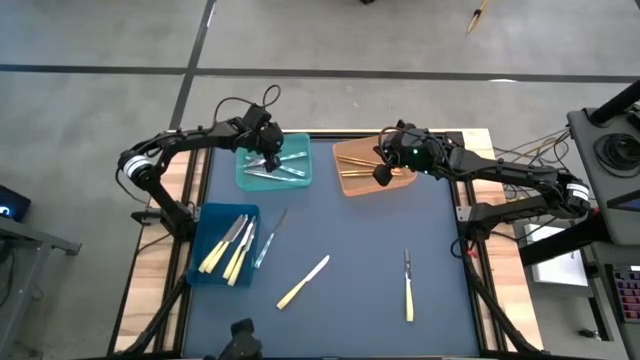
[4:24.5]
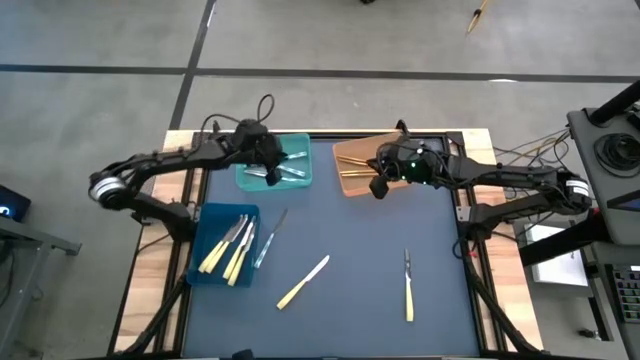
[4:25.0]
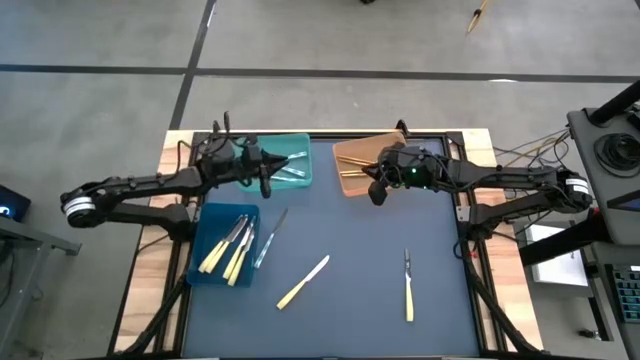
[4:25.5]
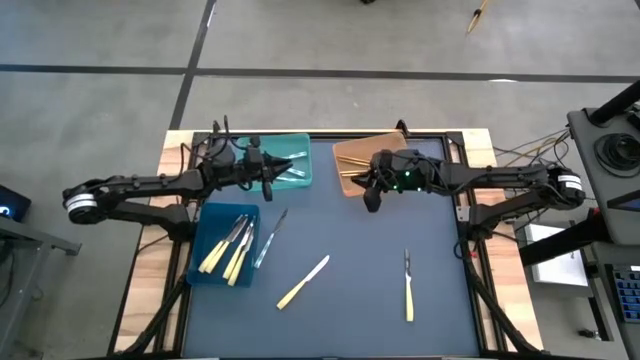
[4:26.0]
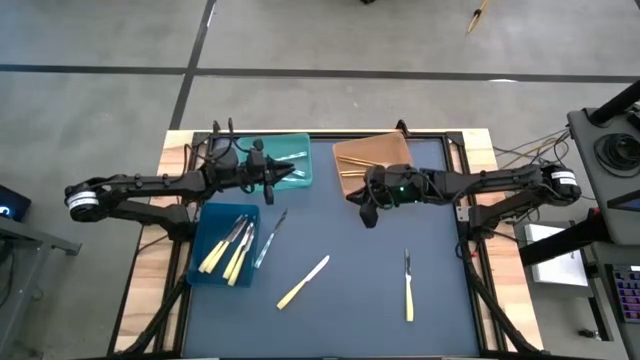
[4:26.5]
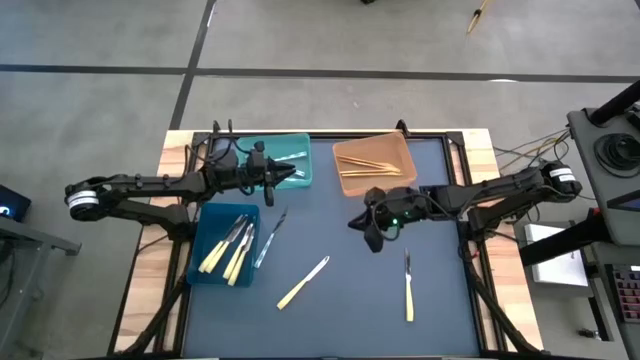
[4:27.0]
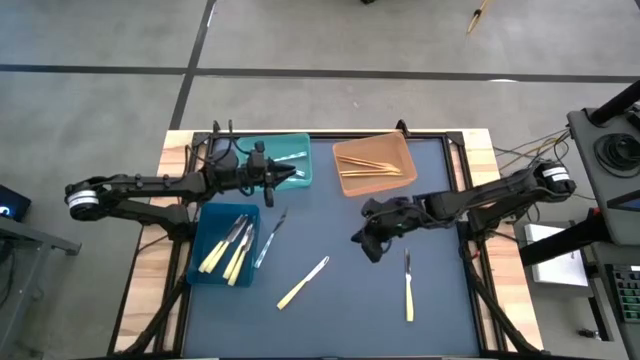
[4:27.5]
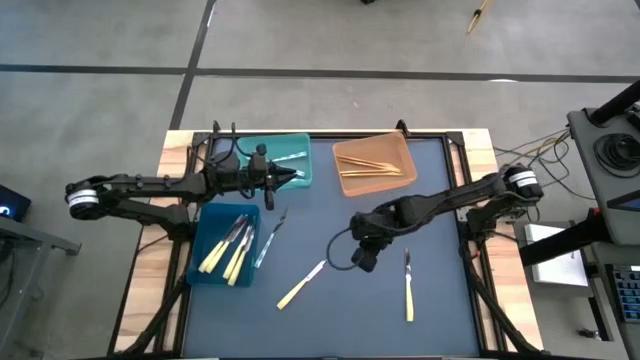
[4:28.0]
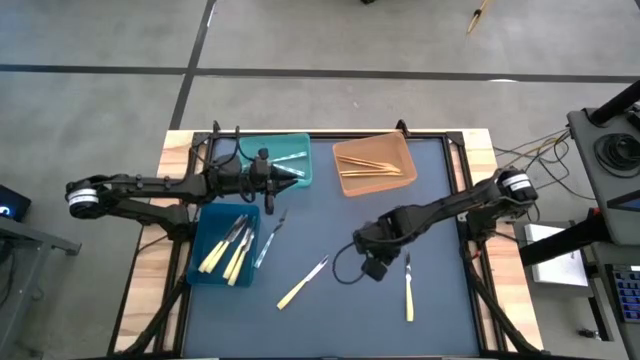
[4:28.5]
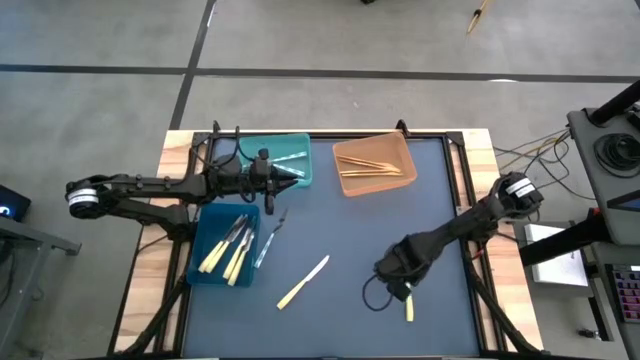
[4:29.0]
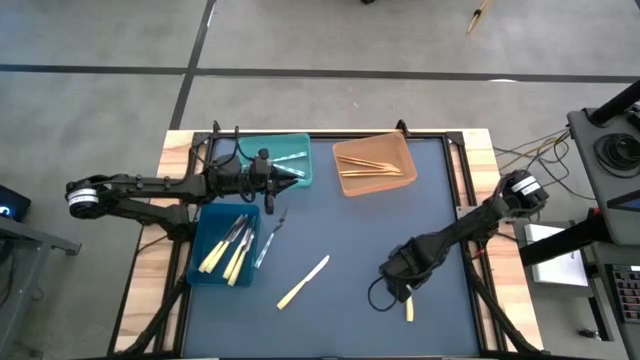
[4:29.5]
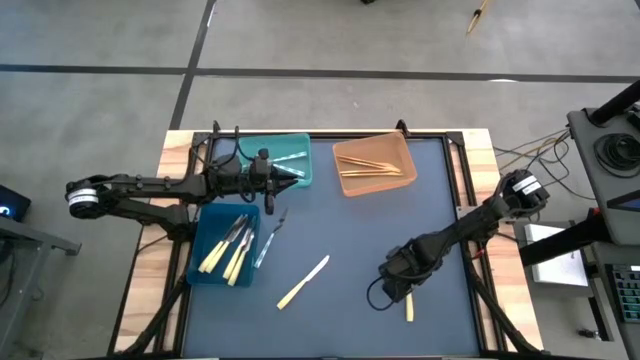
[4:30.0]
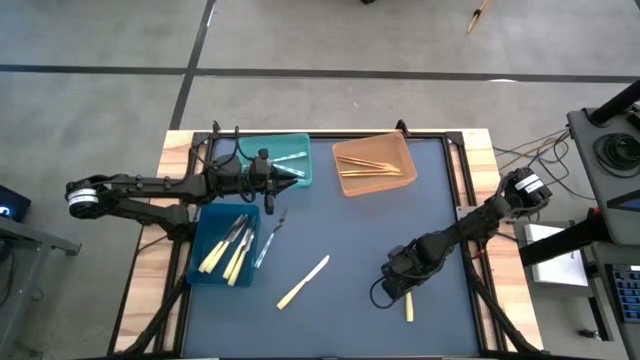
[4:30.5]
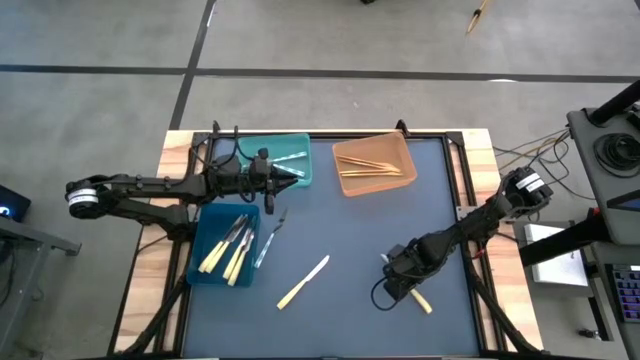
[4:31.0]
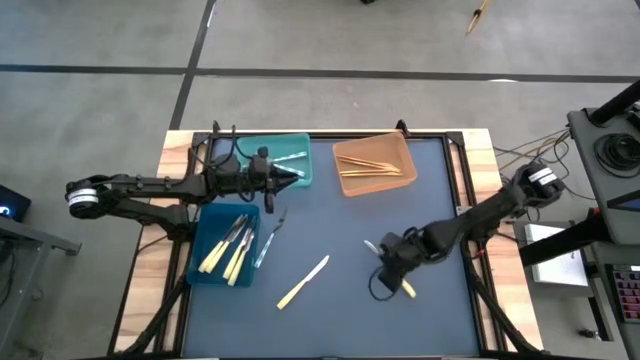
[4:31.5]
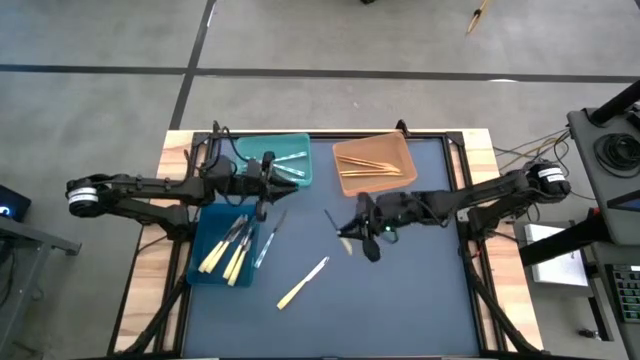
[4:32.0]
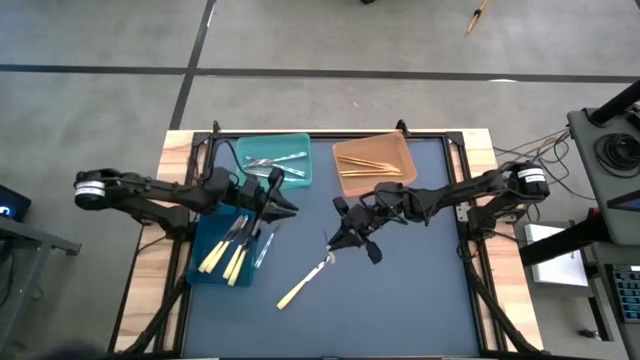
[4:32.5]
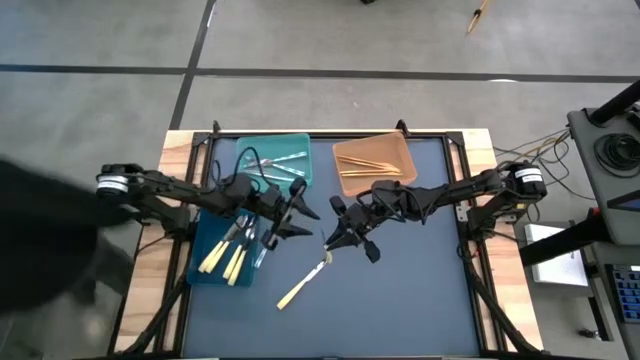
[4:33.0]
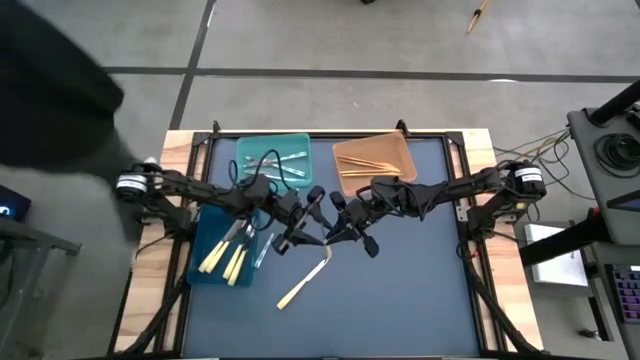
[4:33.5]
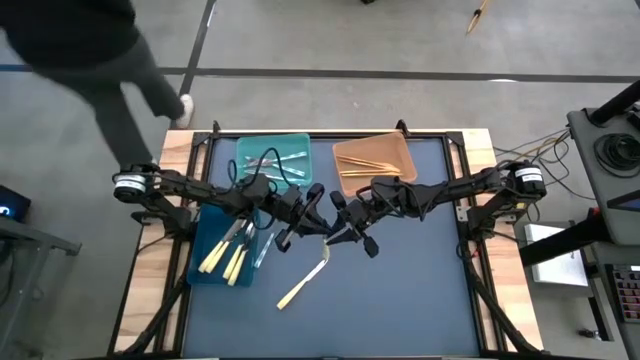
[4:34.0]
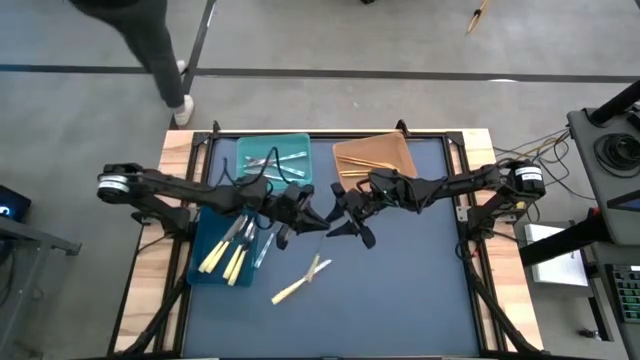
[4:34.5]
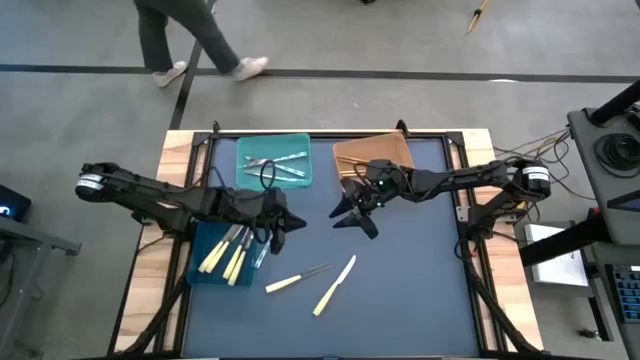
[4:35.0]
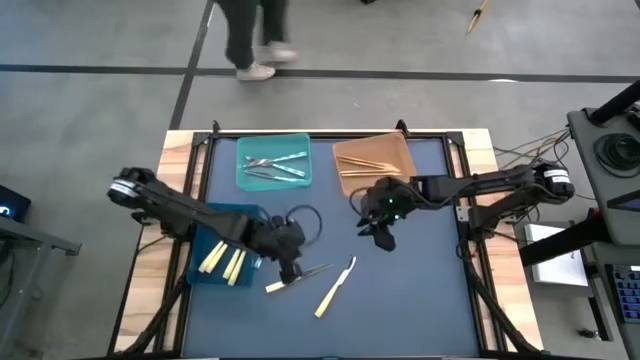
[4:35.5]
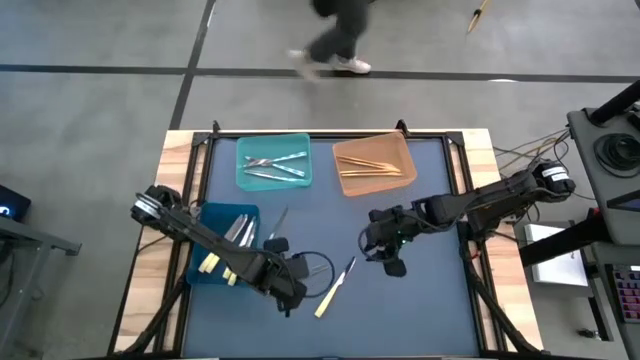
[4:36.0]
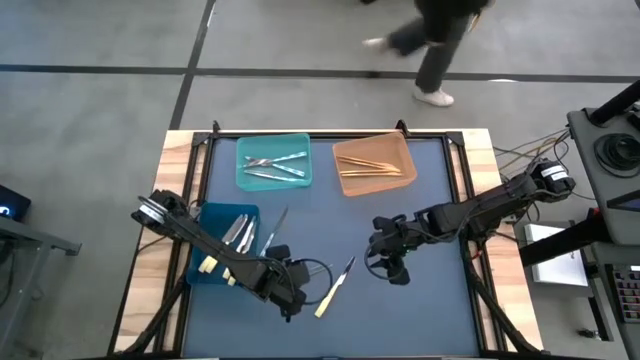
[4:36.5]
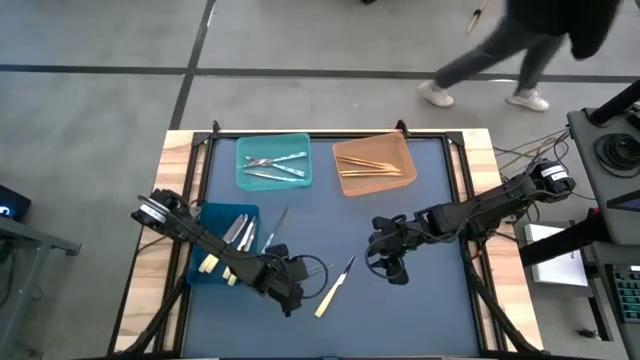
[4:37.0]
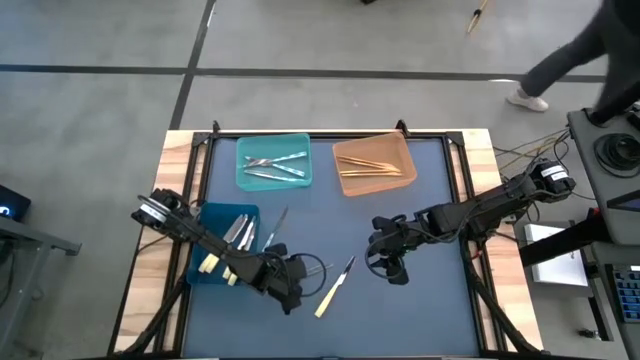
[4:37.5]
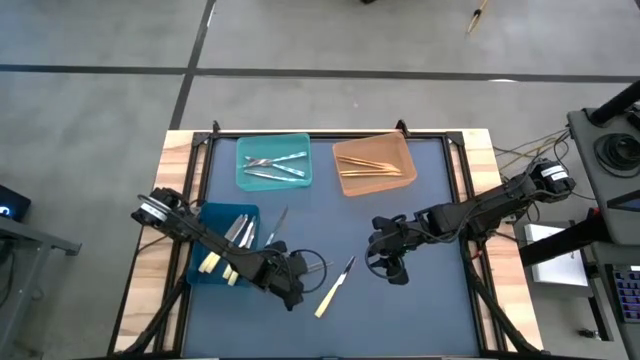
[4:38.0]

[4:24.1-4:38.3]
Task: Sort silverware by color (type)
Put the light yellow knife into the blue bin

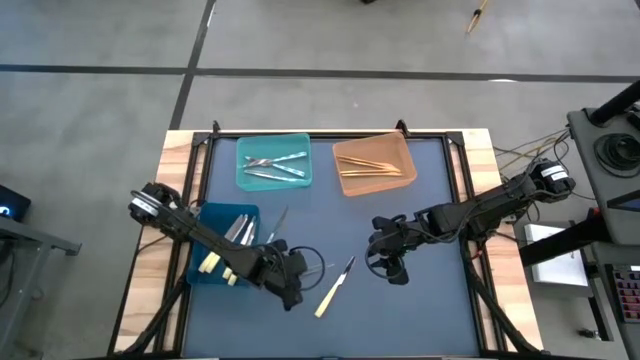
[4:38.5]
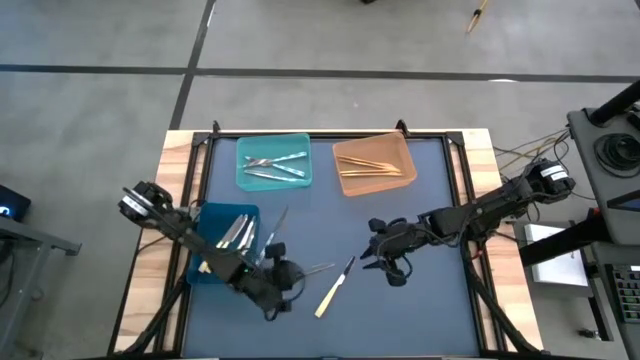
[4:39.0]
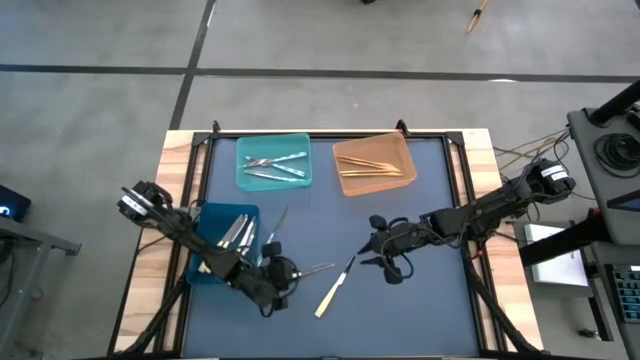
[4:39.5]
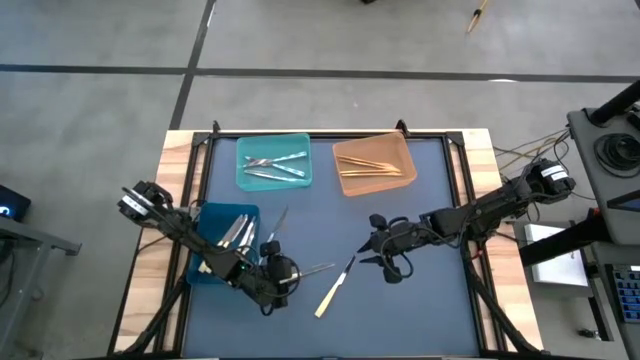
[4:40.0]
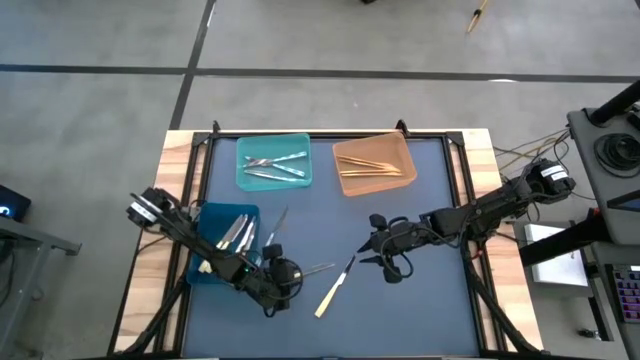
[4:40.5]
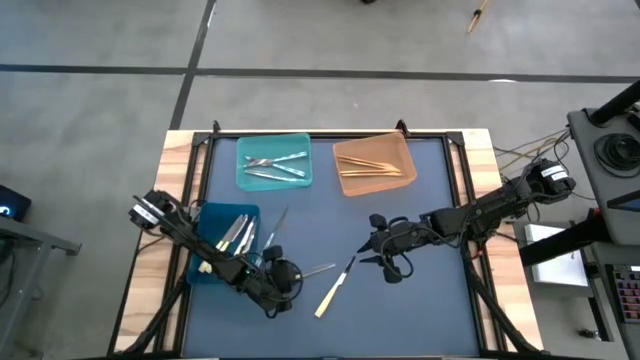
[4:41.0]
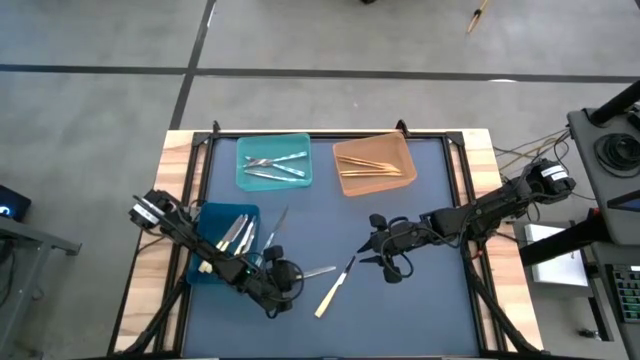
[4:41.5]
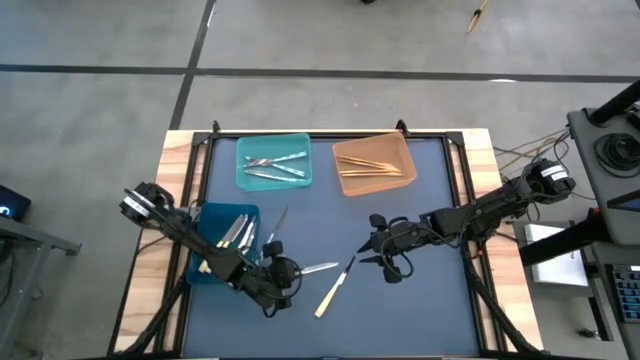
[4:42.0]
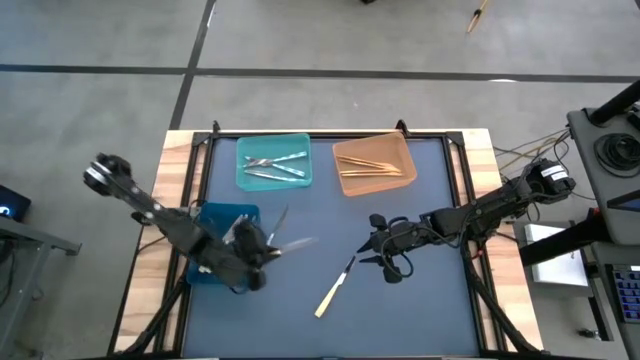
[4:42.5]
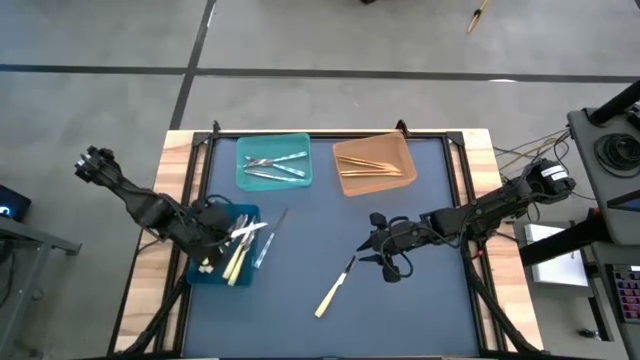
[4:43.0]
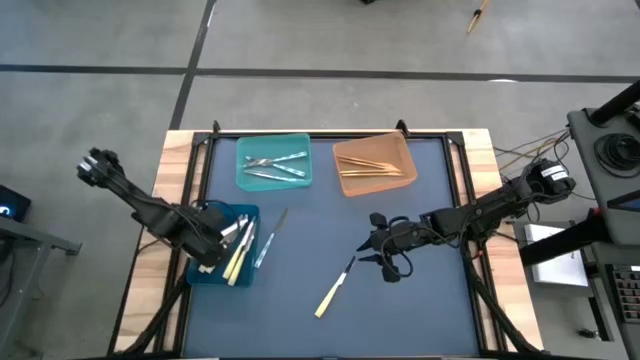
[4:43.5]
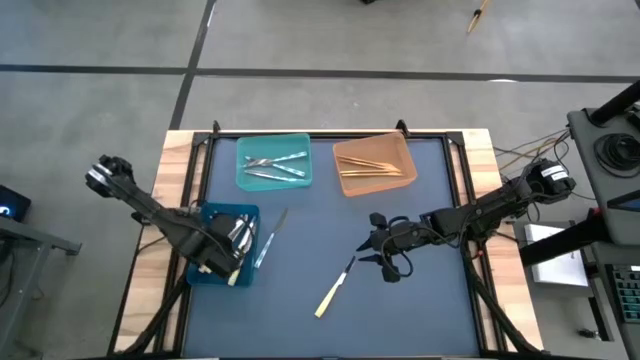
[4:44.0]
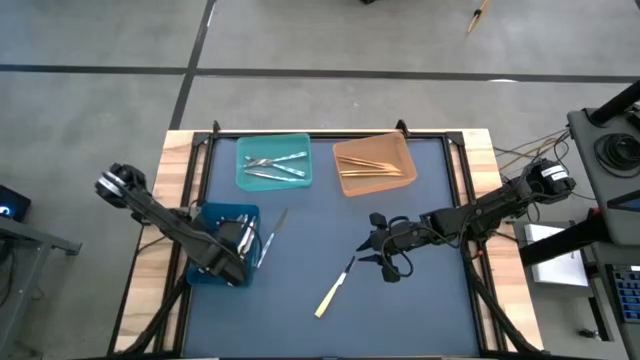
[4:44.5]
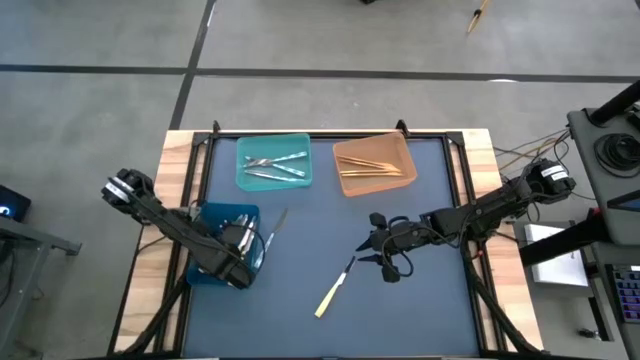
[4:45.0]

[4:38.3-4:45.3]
Put the light yellow knife into the blue bin
